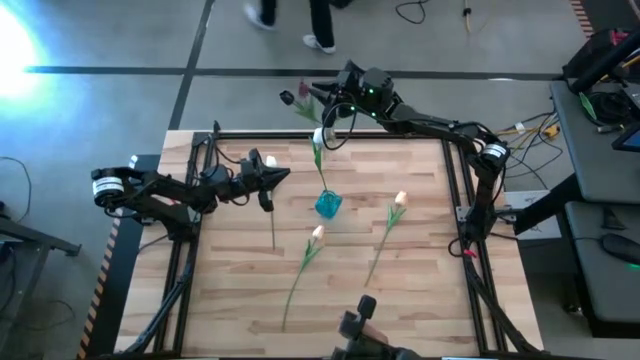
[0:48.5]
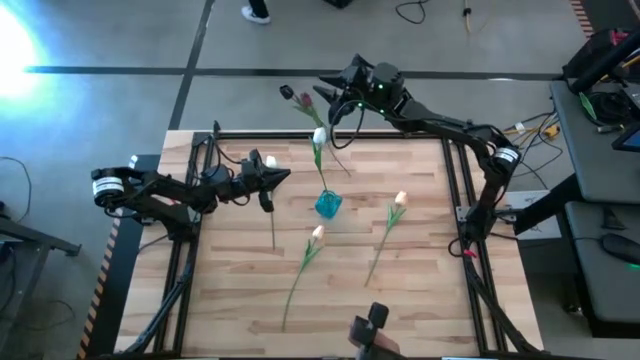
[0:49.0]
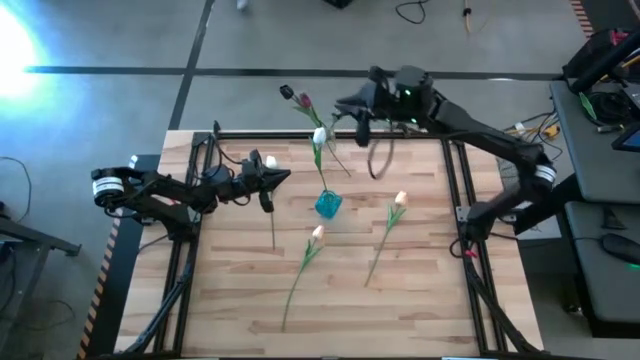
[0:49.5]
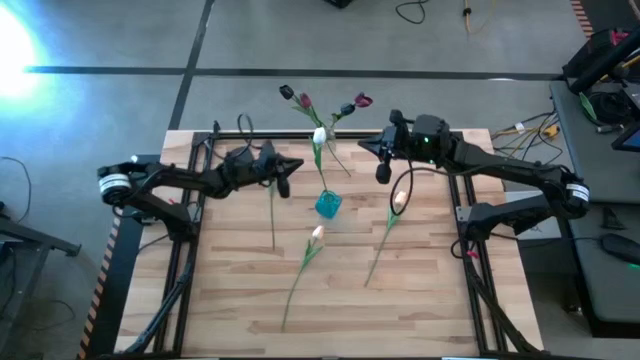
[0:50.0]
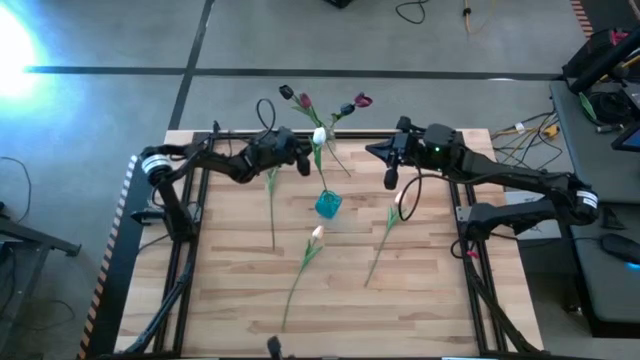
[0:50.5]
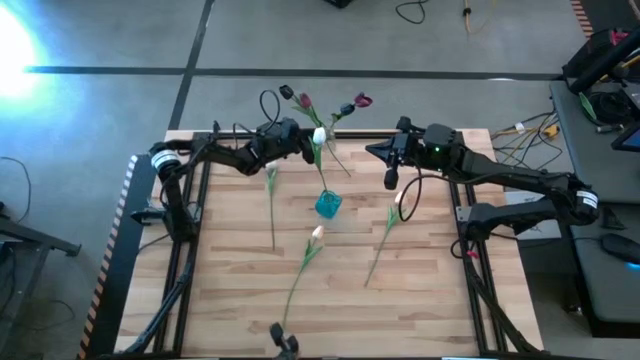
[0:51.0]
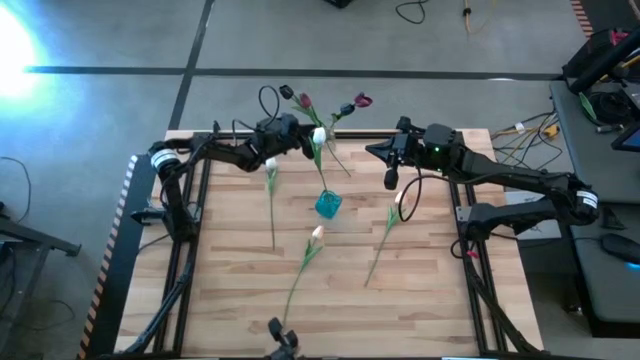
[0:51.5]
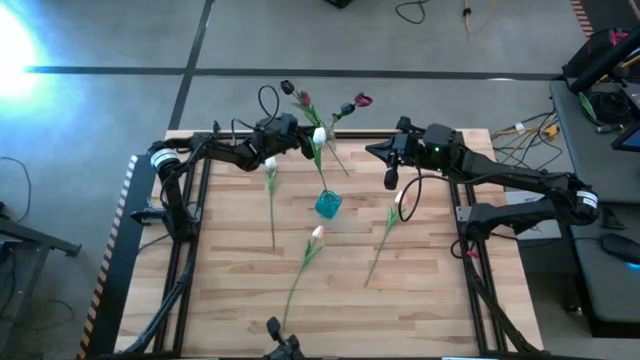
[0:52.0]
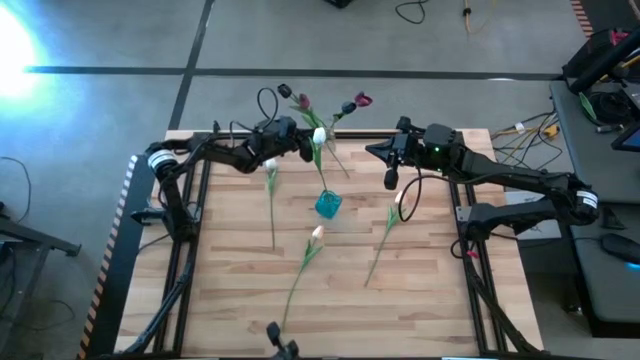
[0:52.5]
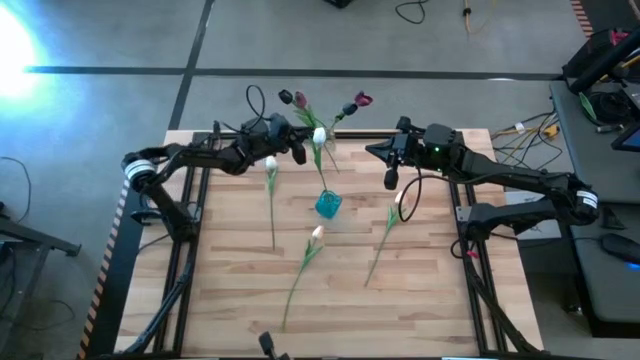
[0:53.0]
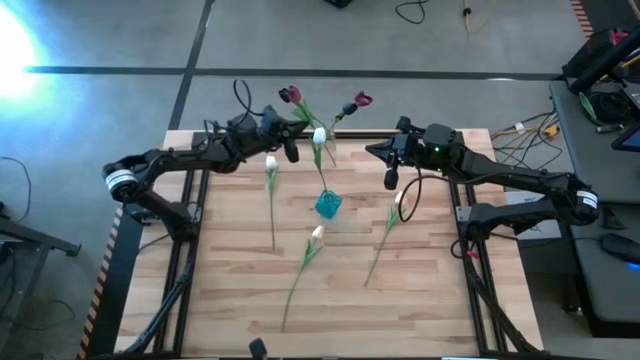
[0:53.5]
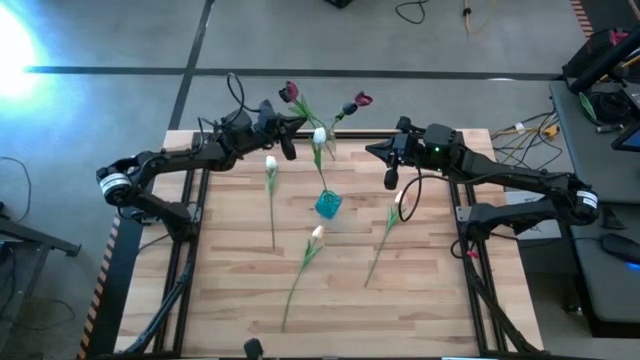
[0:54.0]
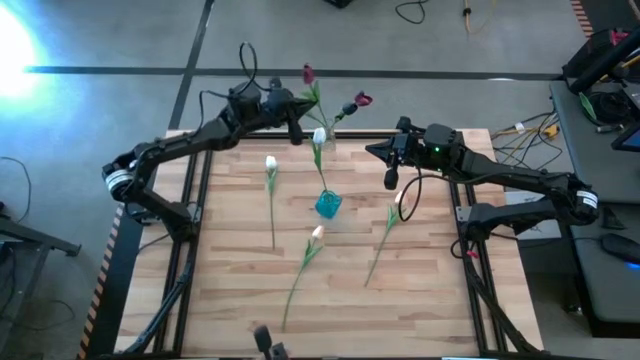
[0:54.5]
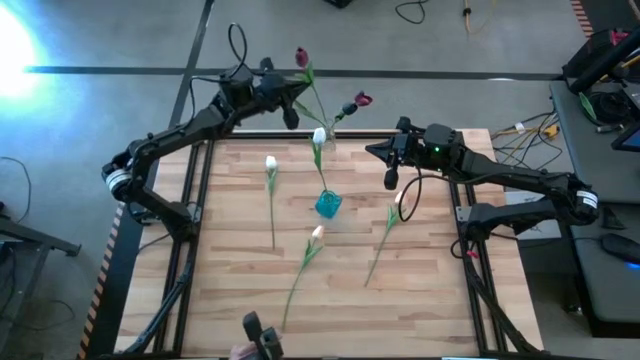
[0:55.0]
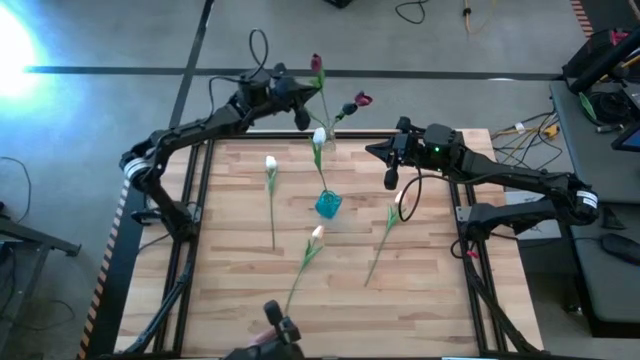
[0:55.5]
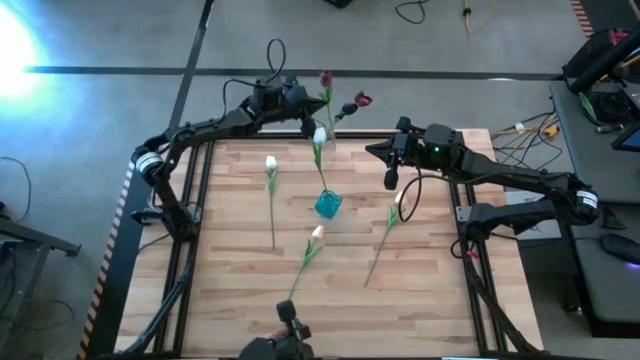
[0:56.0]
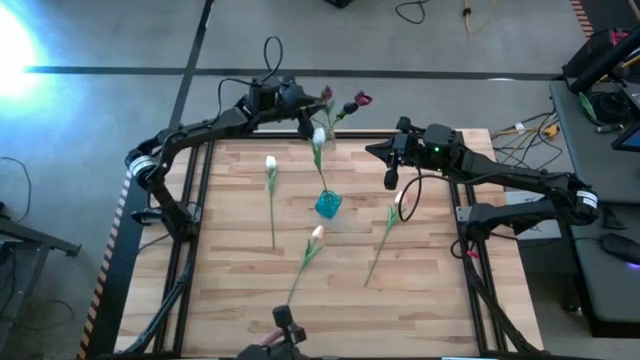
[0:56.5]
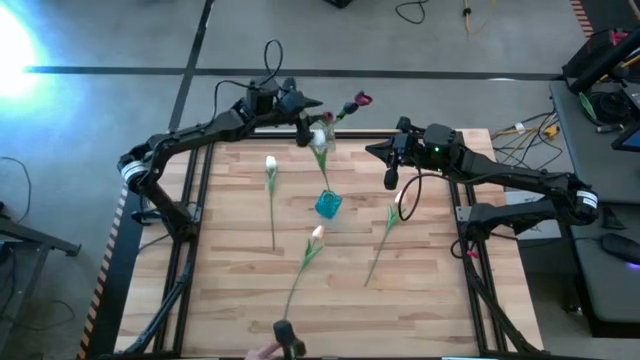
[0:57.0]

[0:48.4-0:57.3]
Task: Sort flowers into vase by color
Put the red tulip into the transparent vase

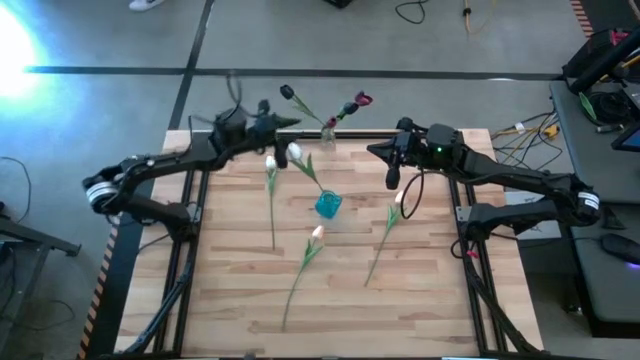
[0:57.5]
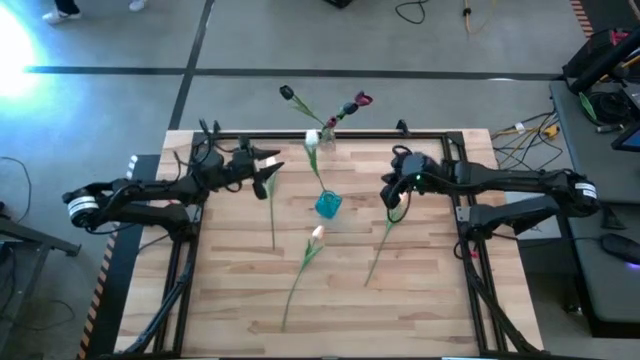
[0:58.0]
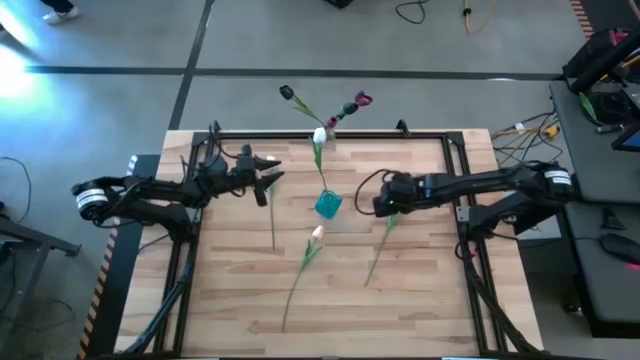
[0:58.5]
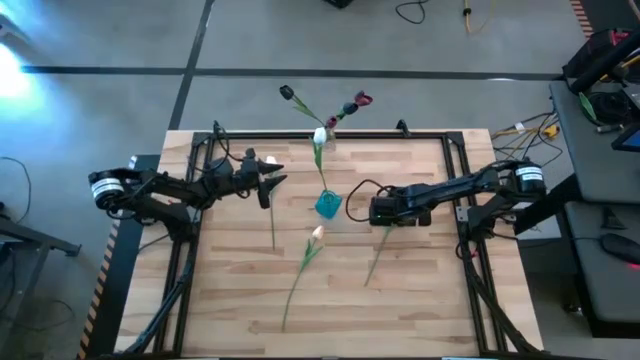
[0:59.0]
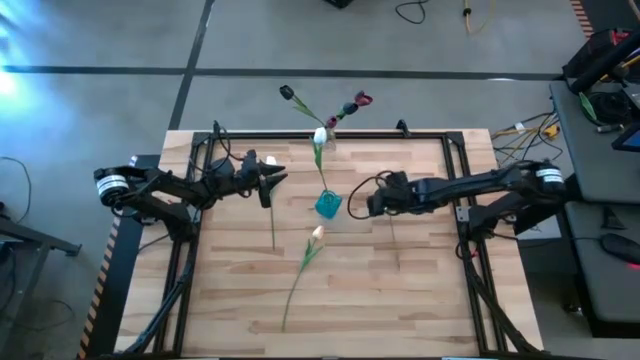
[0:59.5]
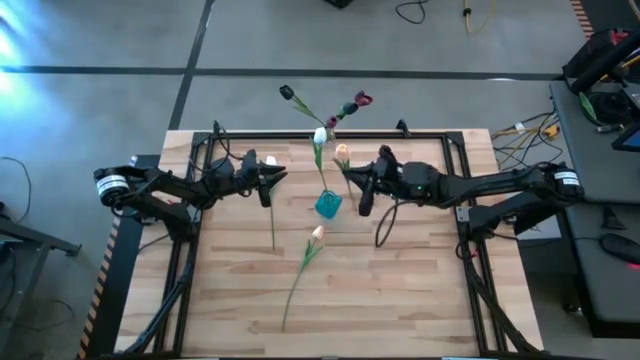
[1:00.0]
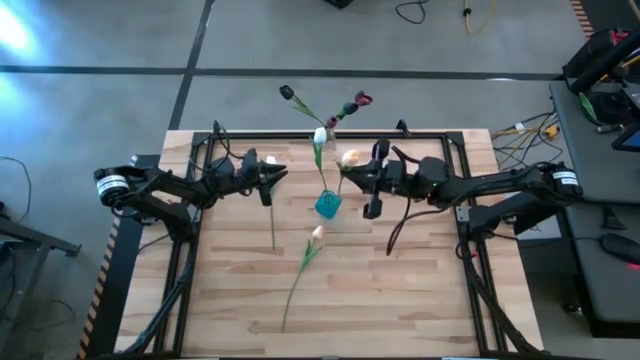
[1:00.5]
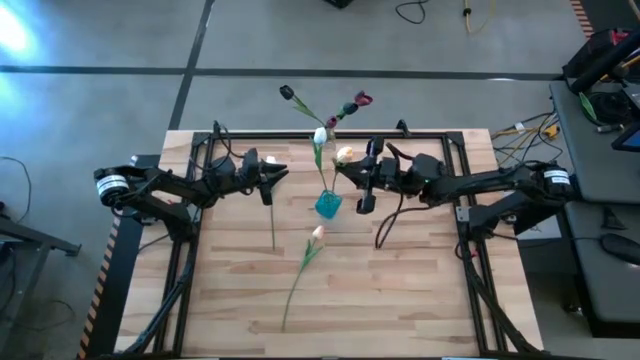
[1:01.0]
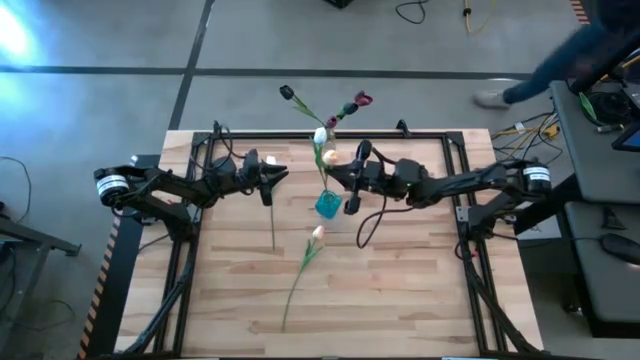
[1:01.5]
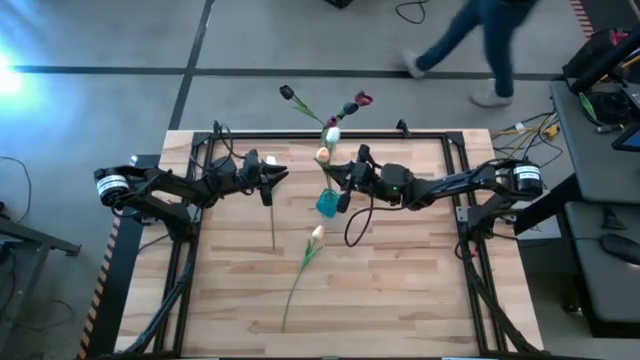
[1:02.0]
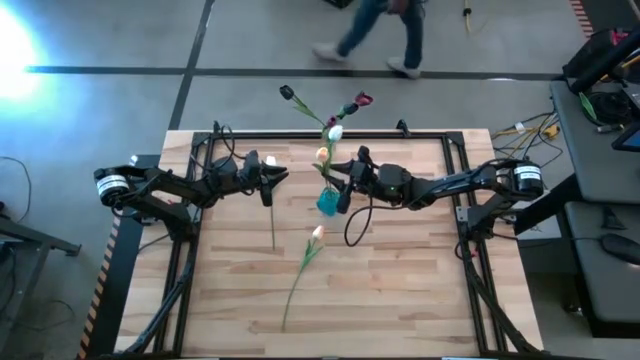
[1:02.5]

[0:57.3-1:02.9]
Put the right orange tulip into the blue vase

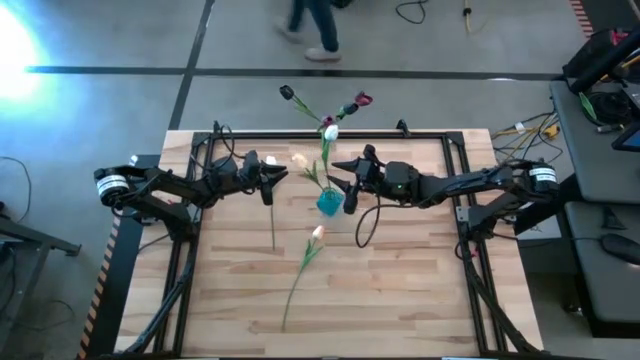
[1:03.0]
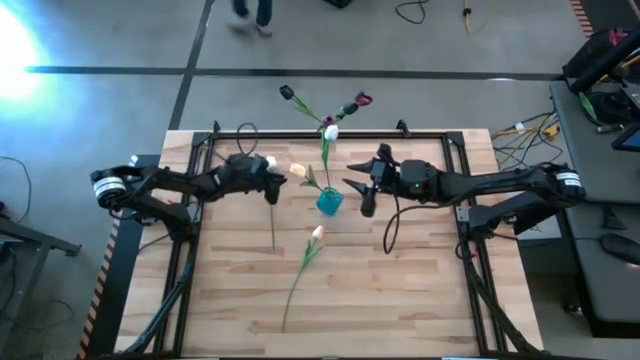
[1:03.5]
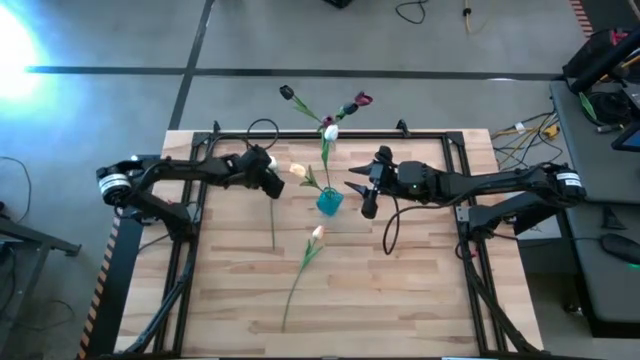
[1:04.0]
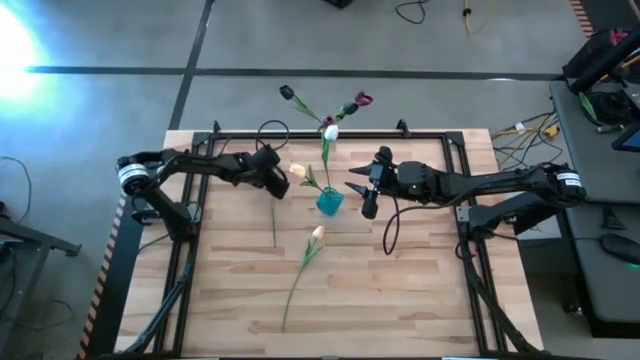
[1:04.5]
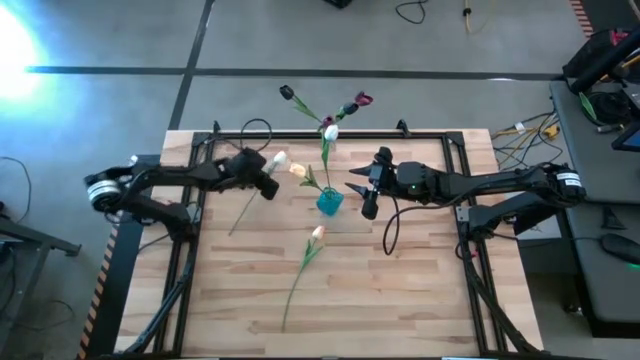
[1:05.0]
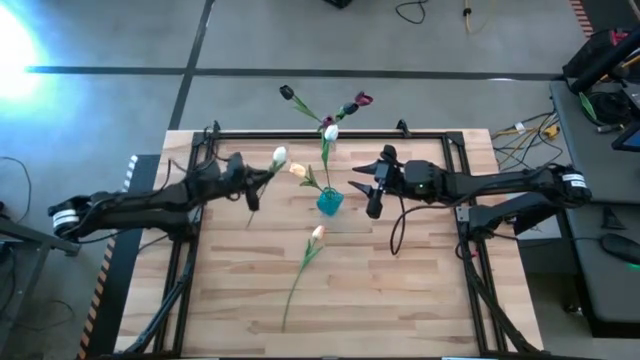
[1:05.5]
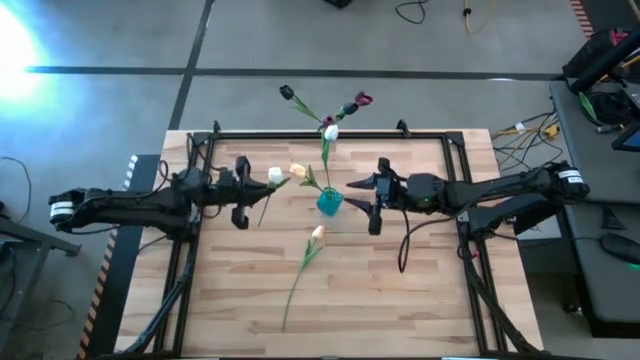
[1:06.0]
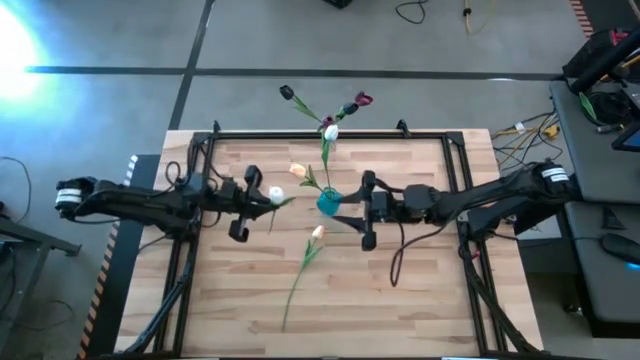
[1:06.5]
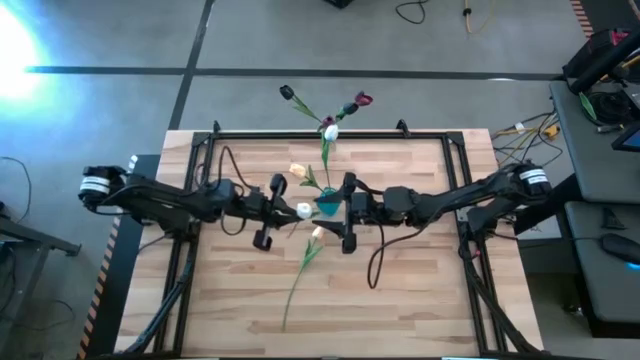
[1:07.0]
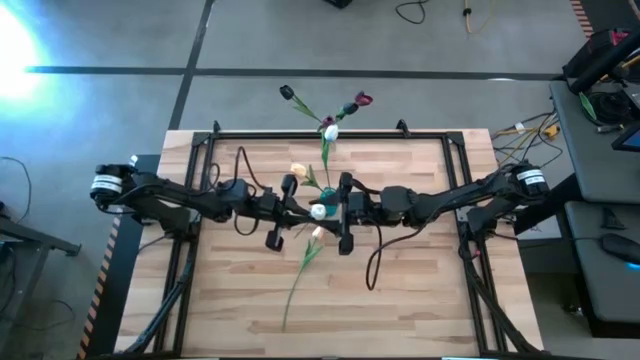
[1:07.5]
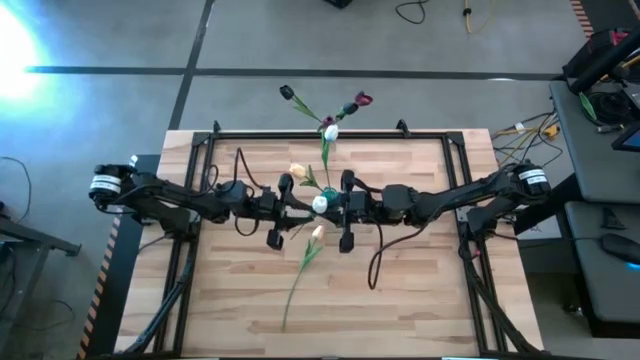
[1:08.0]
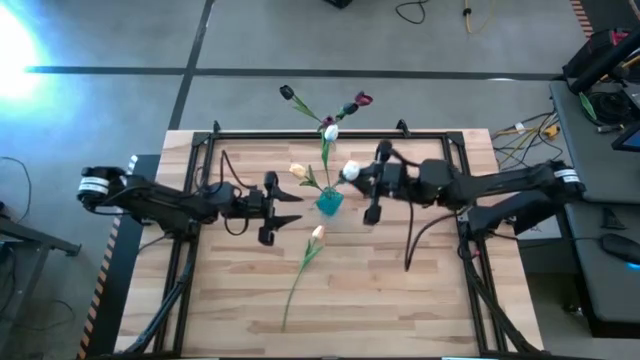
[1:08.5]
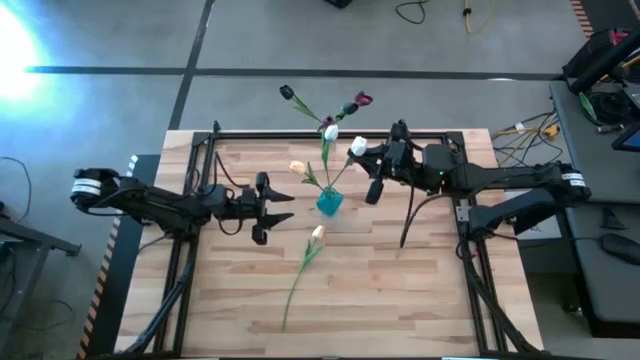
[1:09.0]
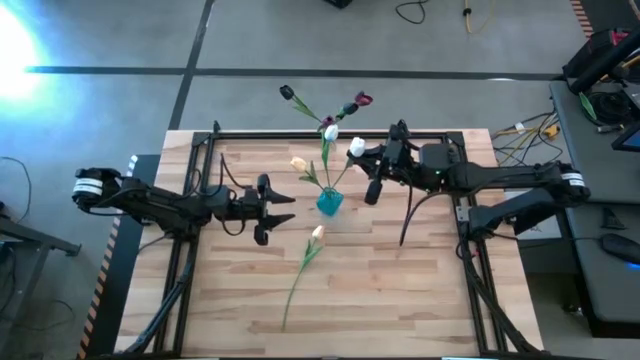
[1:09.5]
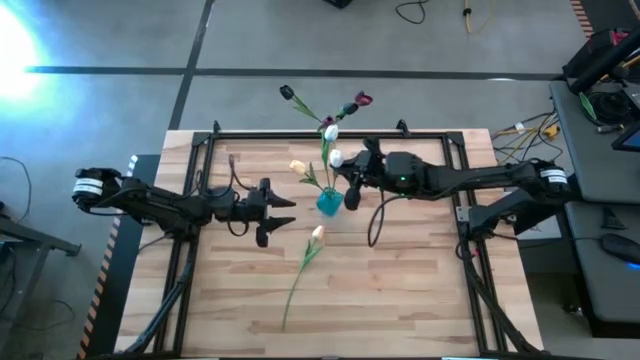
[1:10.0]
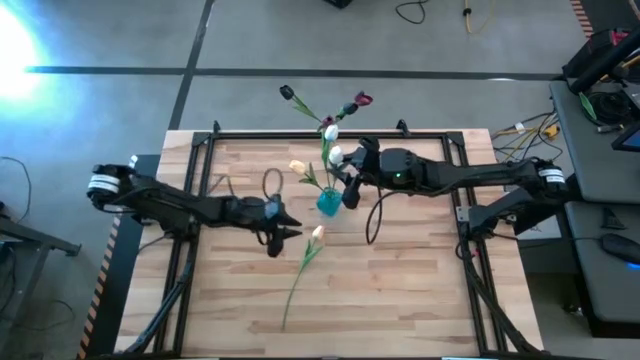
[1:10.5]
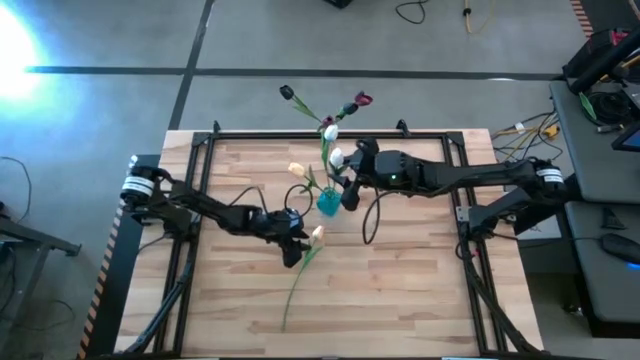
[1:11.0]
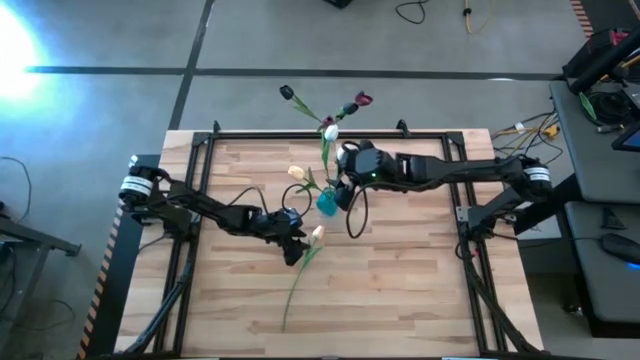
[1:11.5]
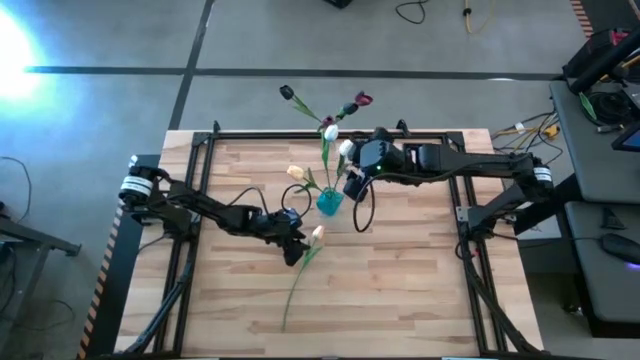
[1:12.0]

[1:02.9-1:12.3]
Put the white tulip into the blue vase
